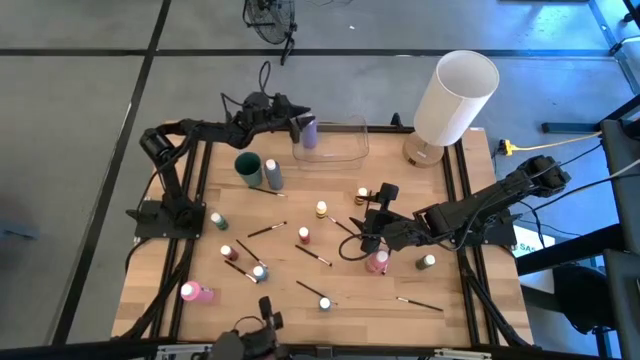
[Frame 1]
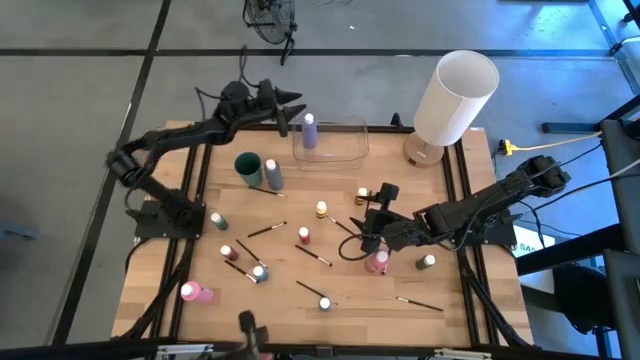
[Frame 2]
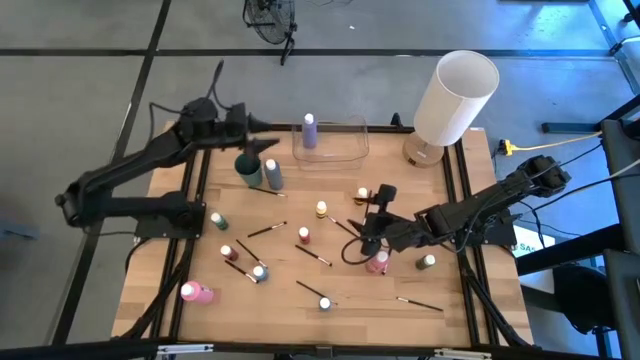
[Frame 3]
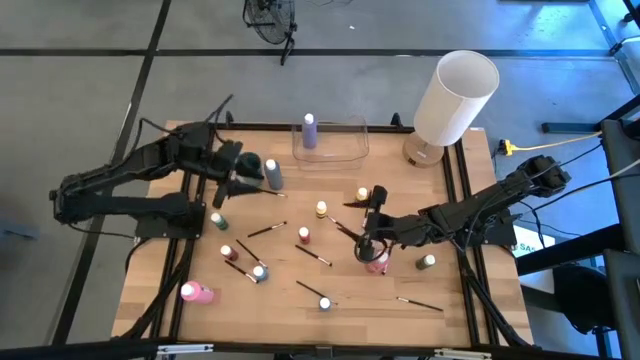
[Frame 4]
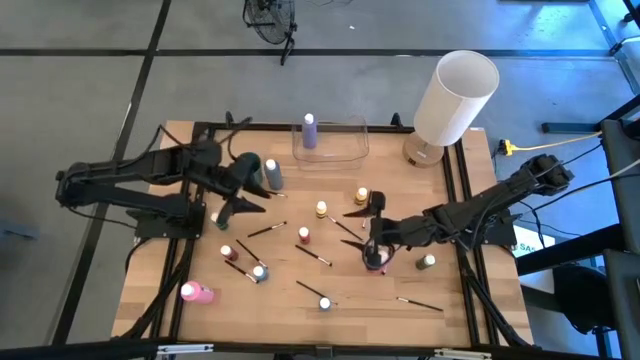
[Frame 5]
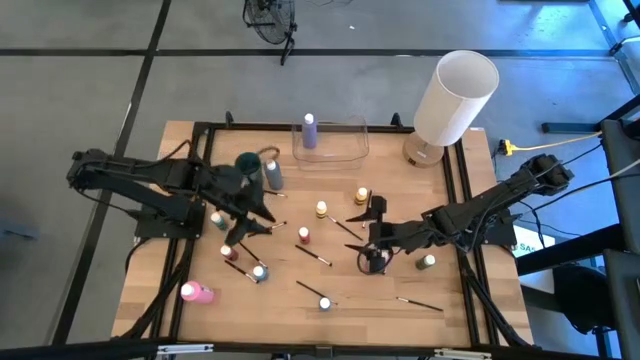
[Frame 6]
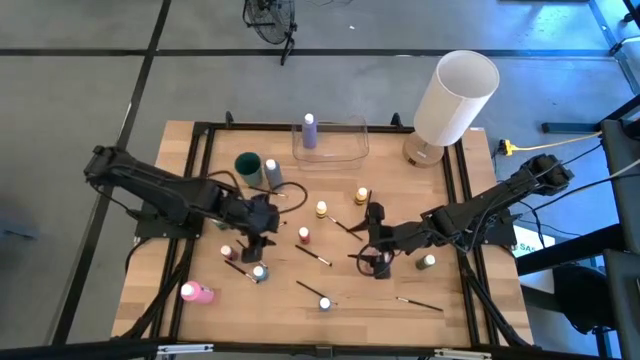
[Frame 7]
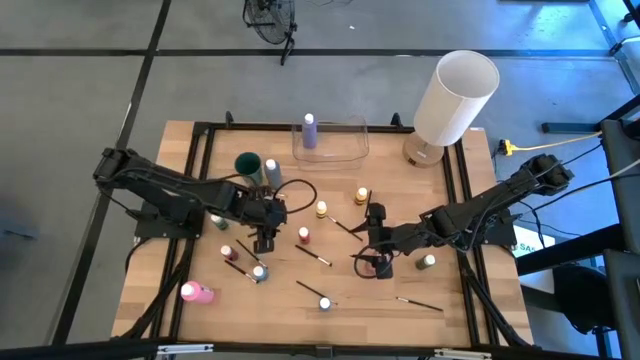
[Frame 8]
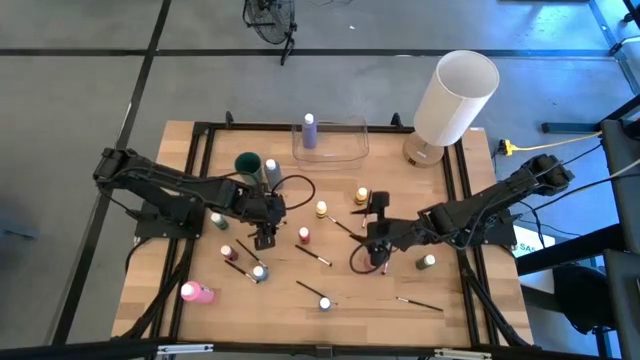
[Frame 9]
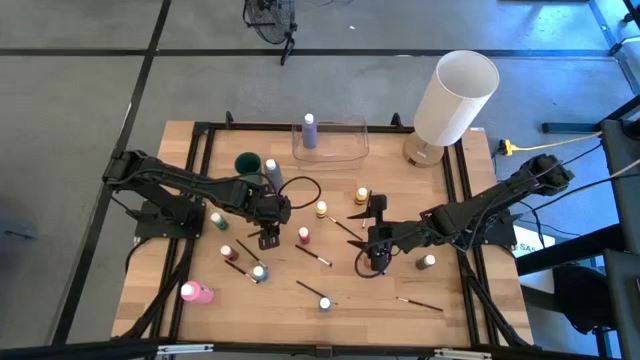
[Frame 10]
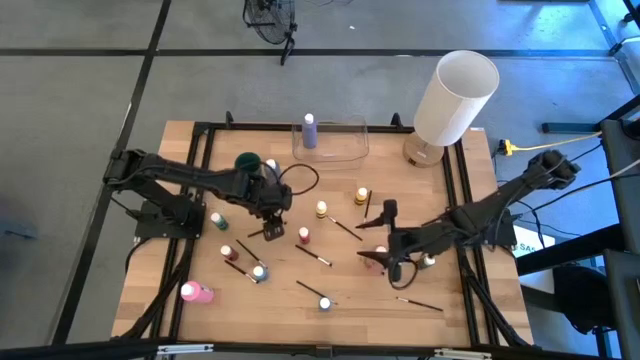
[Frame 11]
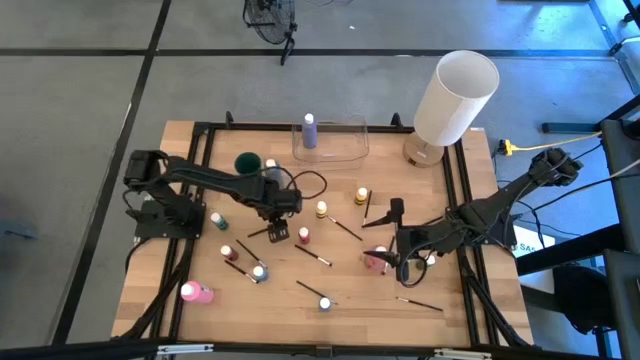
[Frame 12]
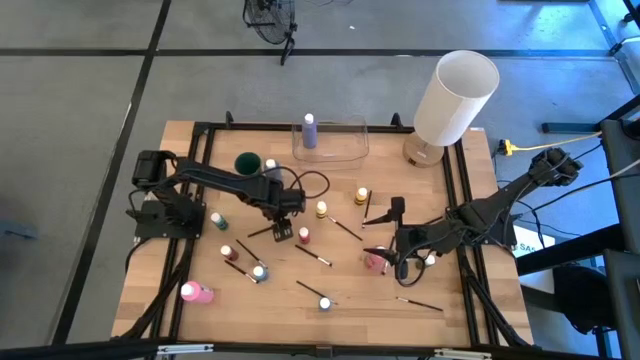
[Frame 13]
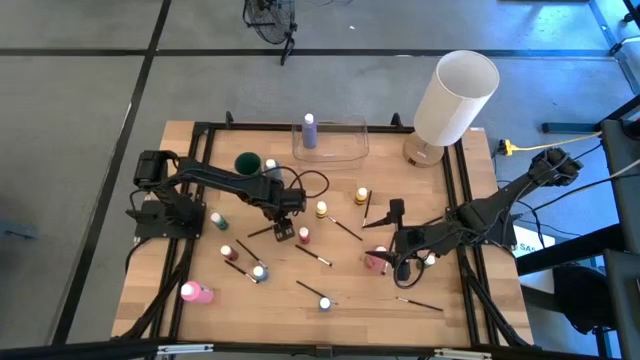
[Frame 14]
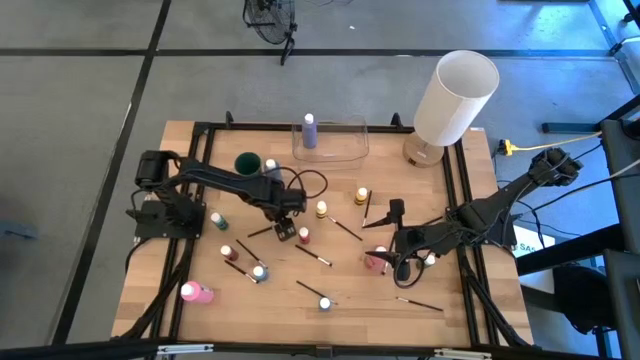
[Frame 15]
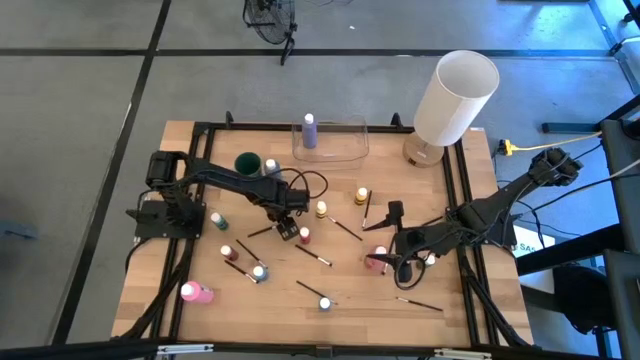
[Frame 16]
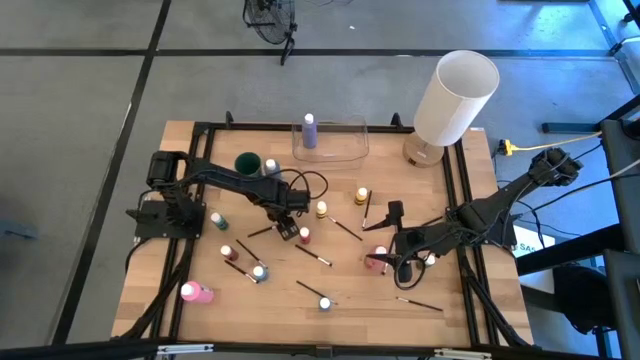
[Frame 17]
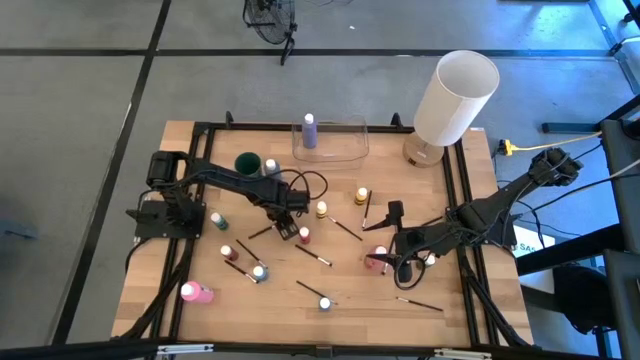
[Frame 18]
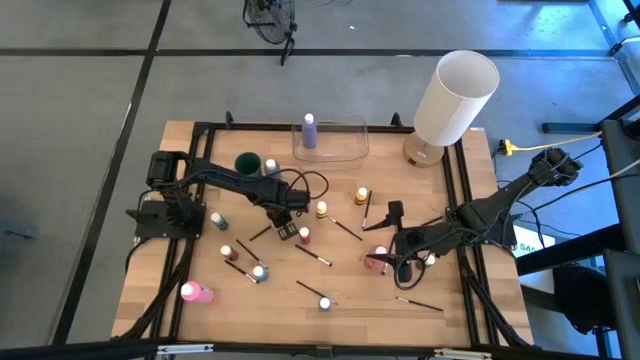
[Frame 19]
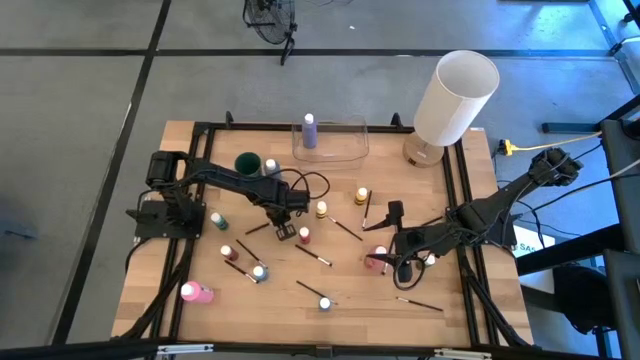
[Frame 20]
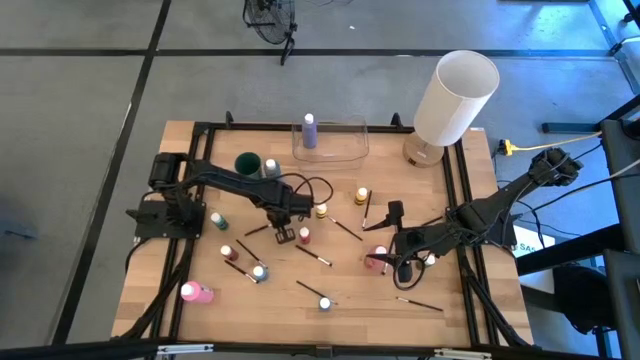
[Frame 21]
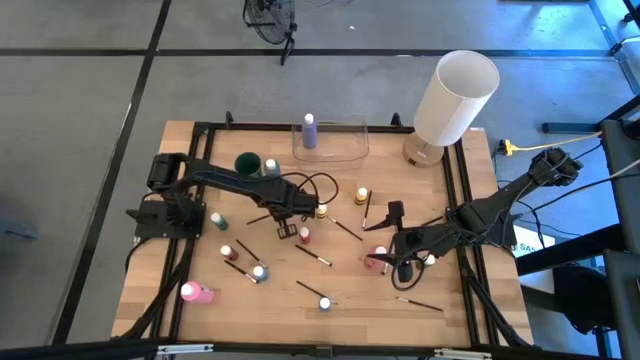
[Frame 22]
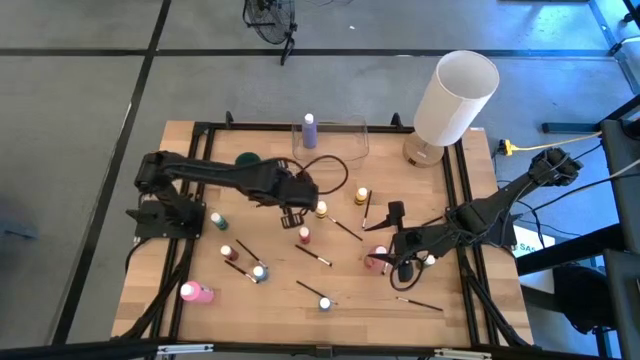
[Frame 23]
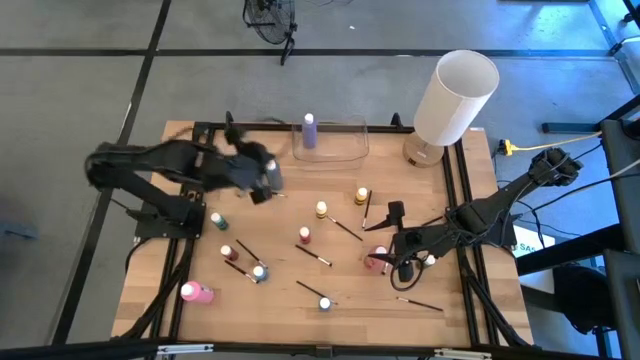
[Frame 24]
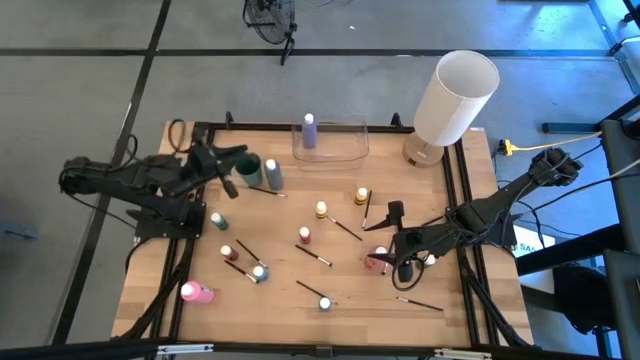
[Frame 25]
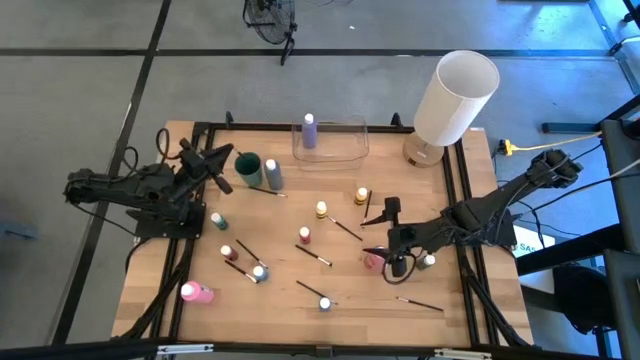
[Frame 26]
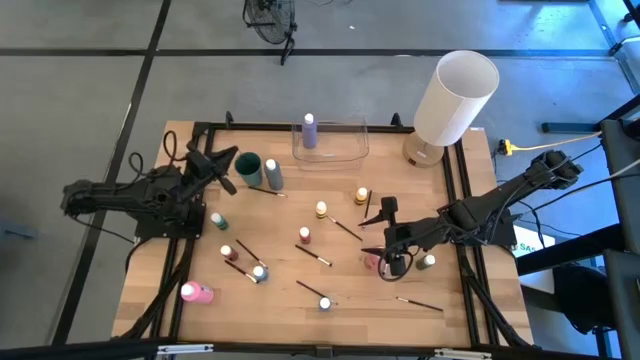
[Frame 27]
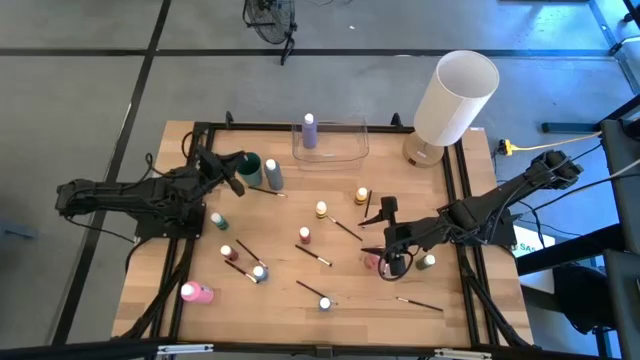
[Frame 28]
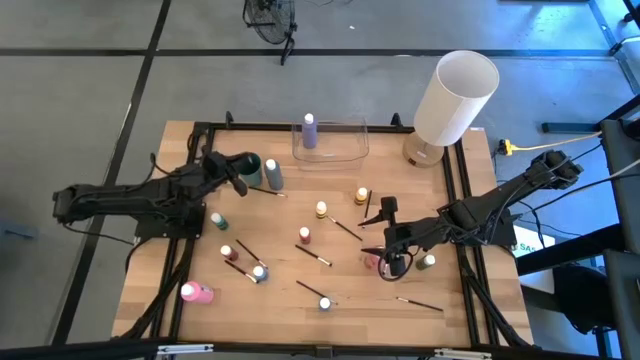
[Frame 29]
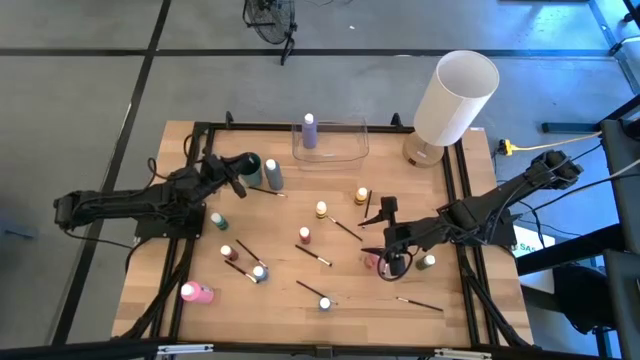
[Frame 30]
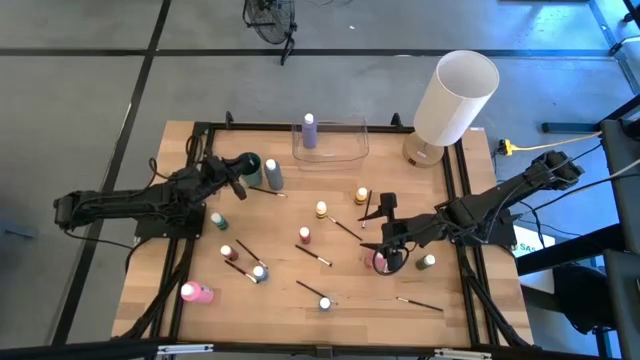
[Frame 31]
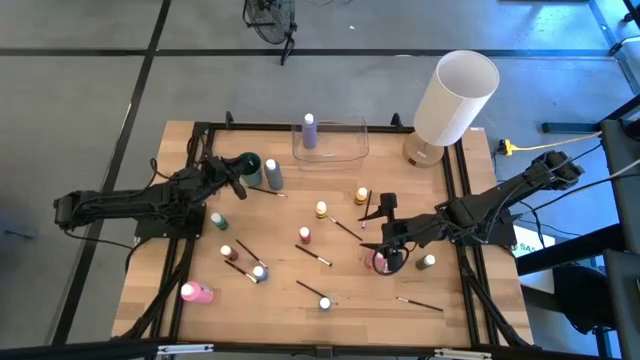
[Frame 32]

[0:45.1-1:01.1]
Task: Pick & Place Paint Supplies
Put the silver paint brush into the green cup

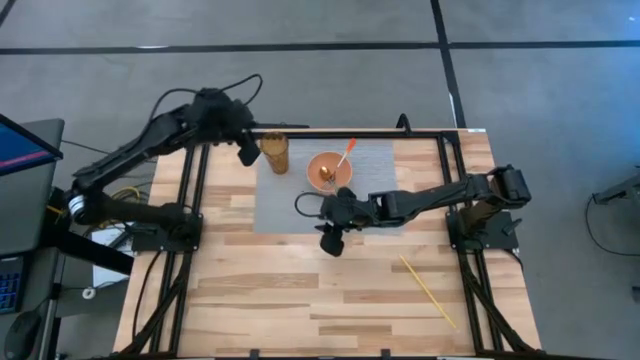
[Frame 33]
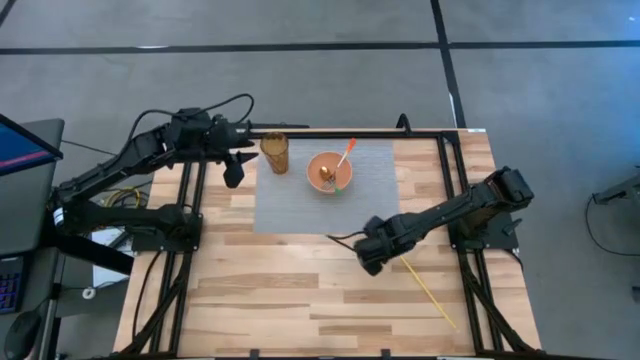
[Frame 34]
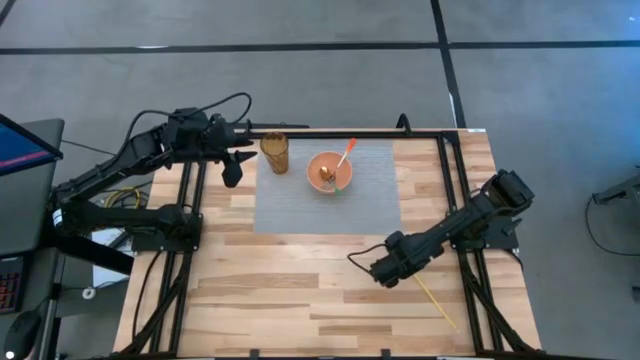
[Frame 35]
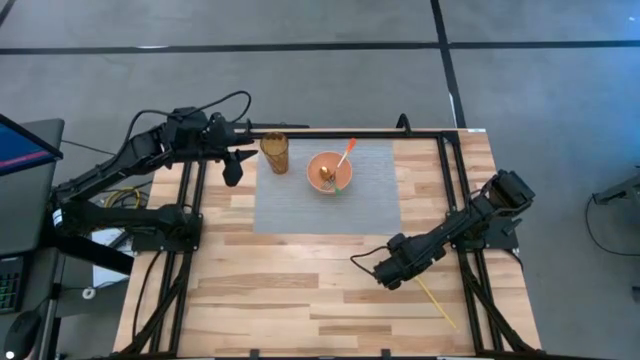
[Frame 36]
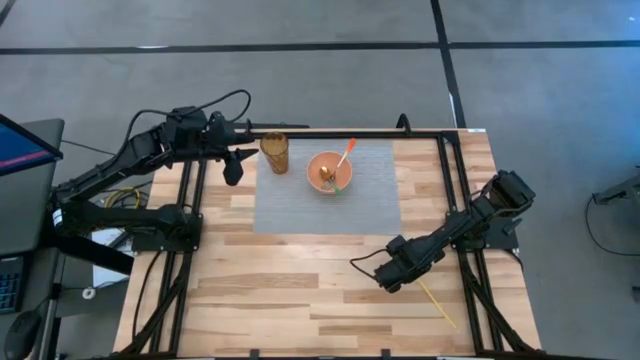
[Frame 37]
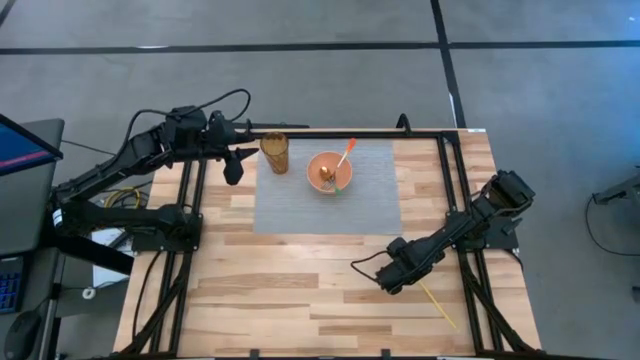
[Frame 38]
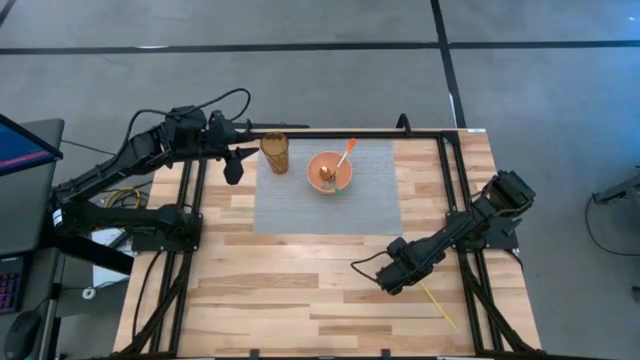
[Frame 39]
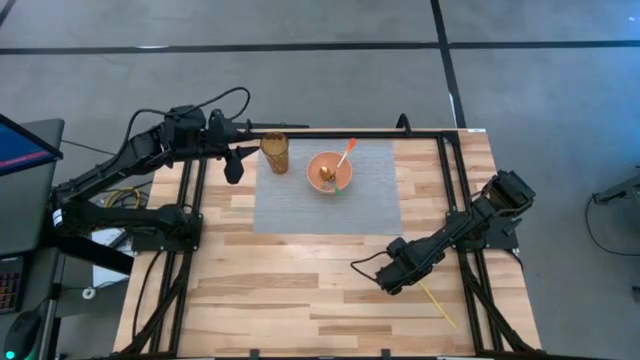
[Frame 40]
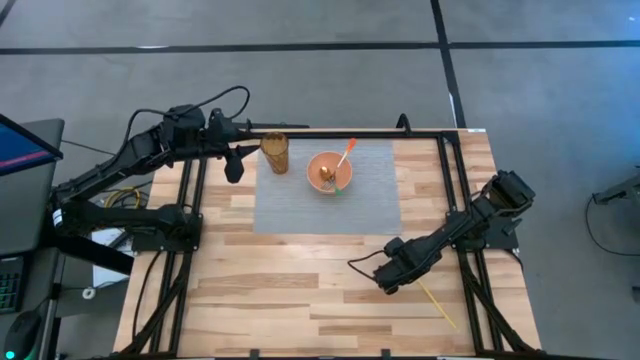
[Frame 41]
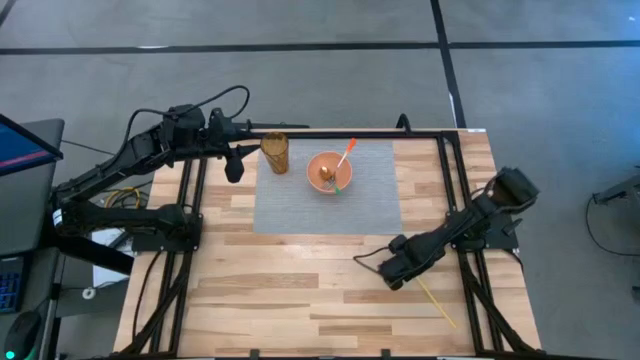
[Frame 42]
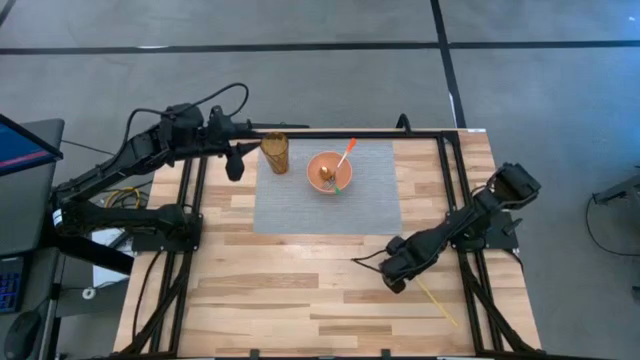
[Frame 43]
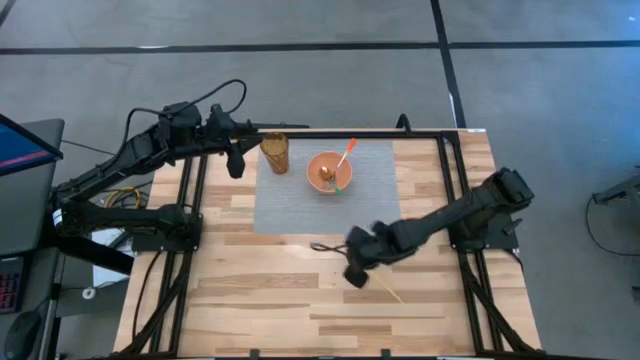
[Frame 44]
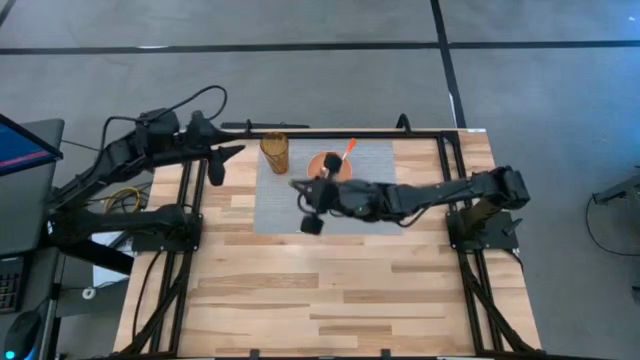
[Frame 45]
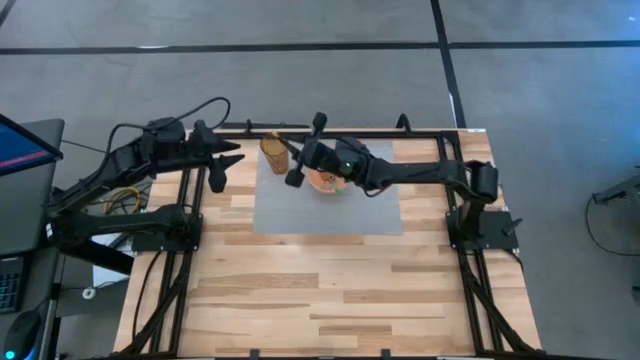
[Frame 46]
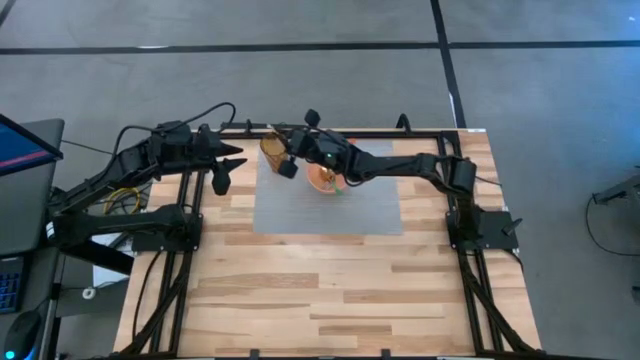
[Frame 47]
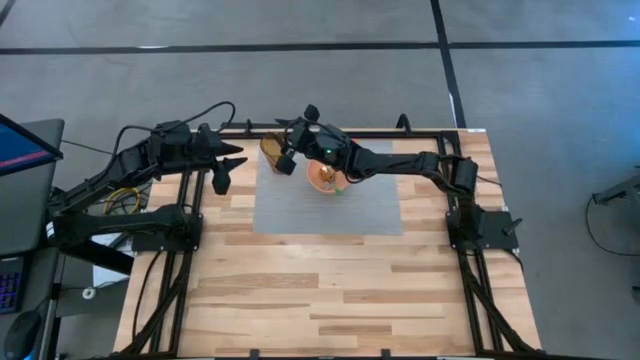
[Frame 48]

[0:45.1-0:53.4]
Task: Pick & Place Utensil
Put the yellow straw into the orange glass cup
